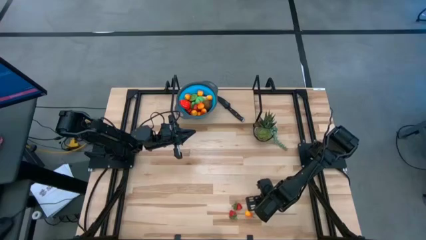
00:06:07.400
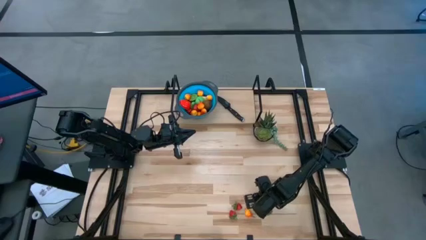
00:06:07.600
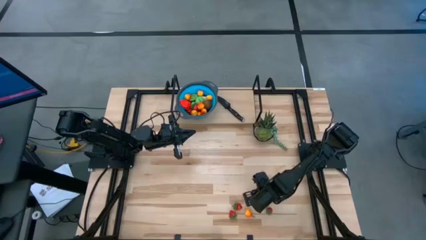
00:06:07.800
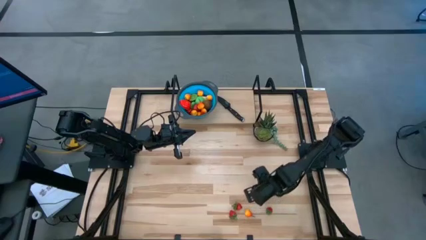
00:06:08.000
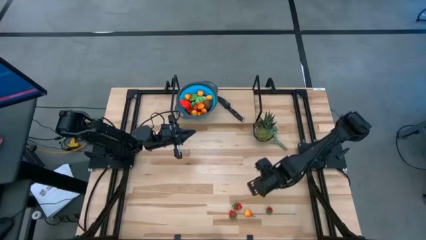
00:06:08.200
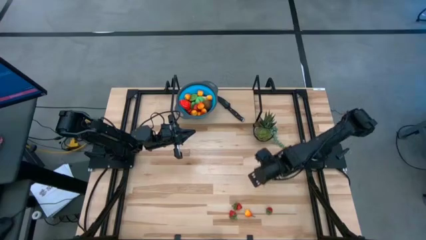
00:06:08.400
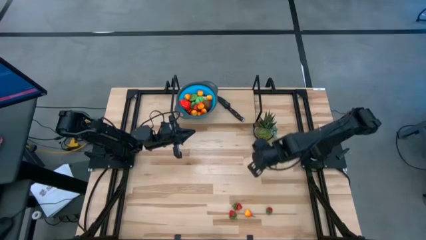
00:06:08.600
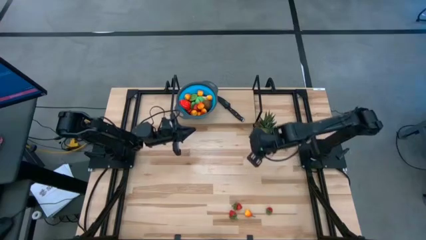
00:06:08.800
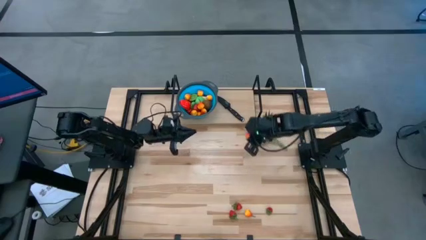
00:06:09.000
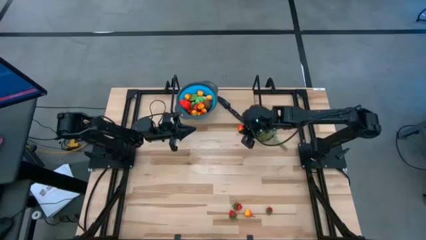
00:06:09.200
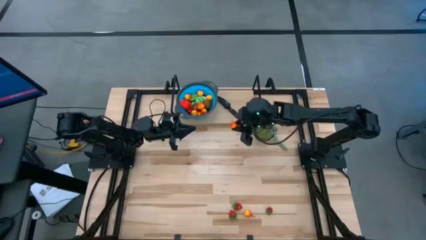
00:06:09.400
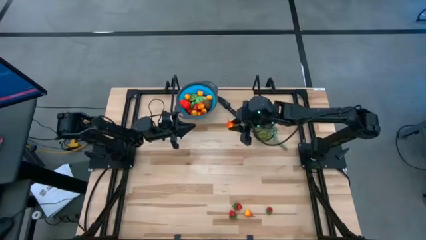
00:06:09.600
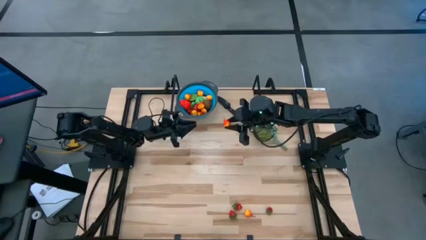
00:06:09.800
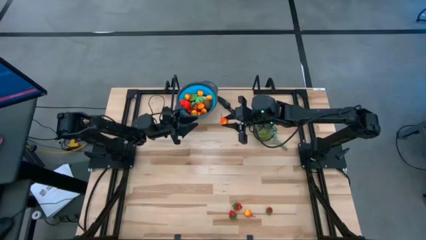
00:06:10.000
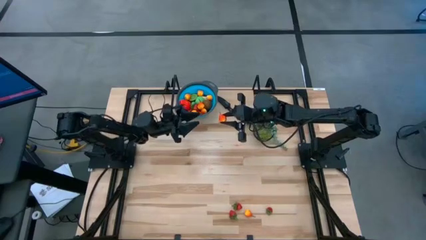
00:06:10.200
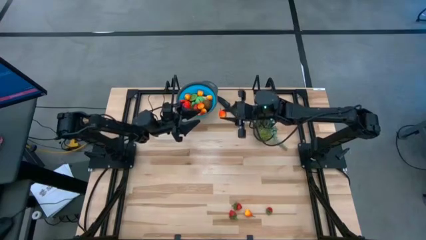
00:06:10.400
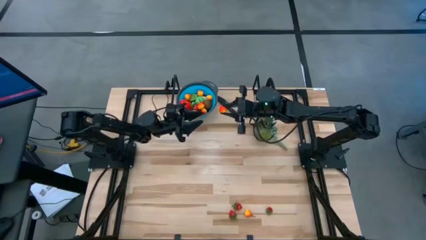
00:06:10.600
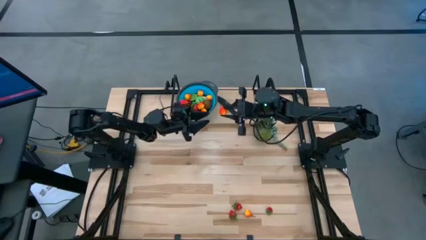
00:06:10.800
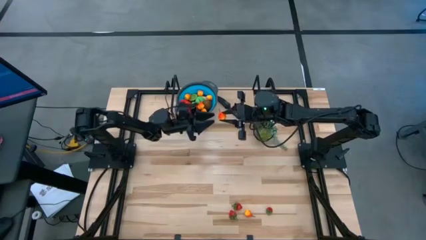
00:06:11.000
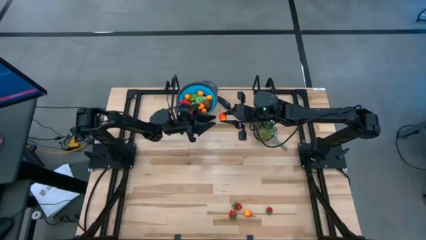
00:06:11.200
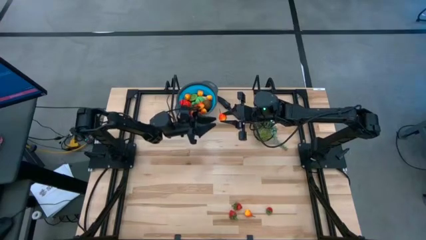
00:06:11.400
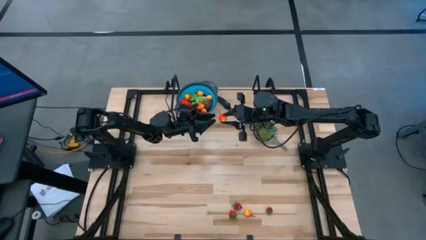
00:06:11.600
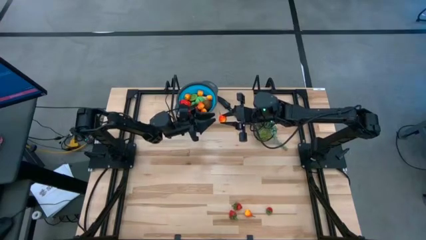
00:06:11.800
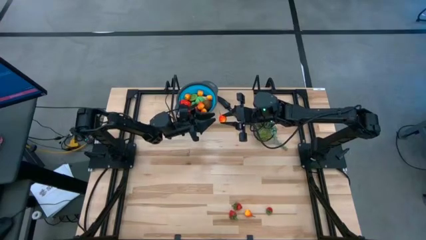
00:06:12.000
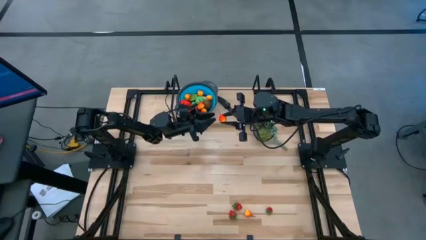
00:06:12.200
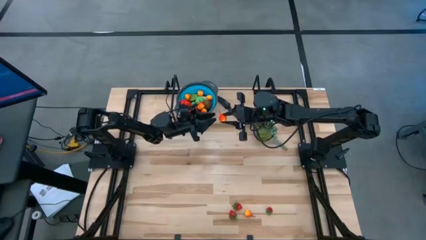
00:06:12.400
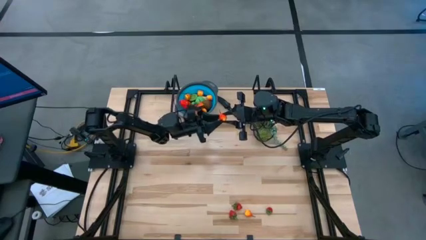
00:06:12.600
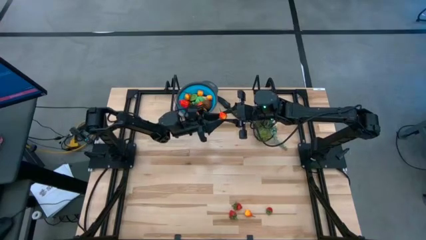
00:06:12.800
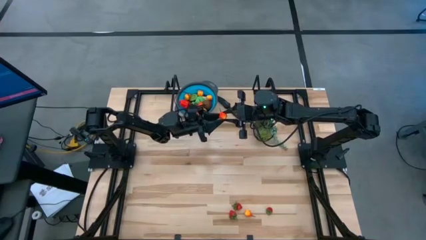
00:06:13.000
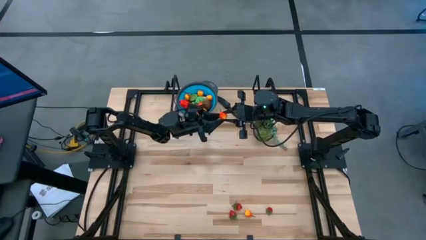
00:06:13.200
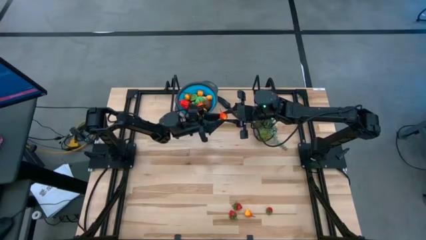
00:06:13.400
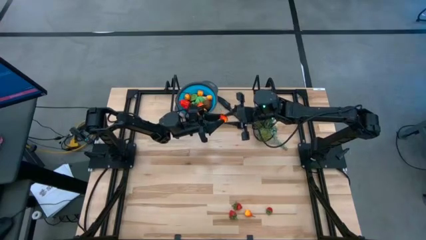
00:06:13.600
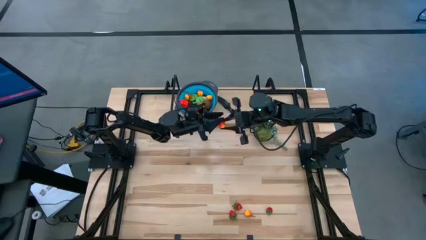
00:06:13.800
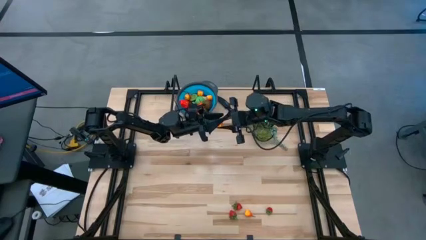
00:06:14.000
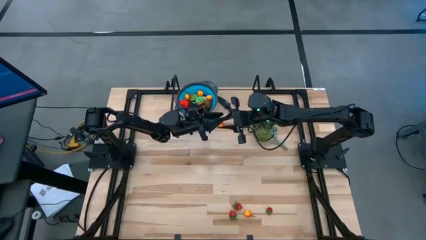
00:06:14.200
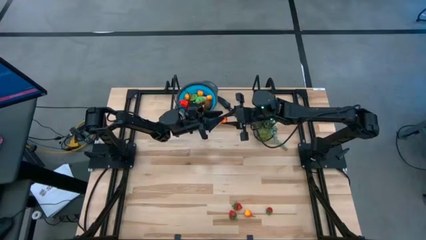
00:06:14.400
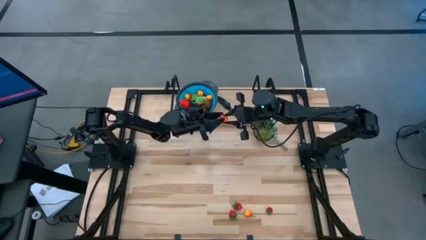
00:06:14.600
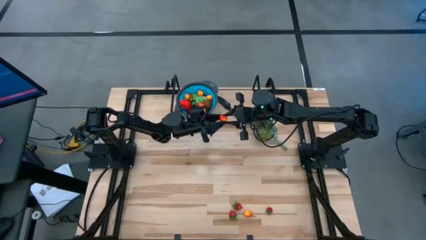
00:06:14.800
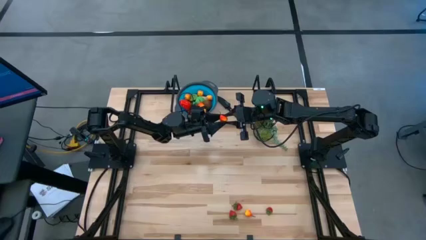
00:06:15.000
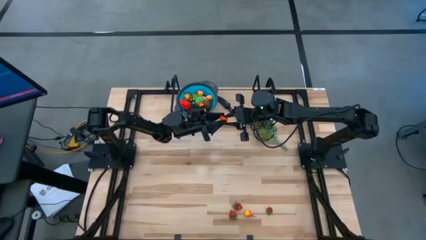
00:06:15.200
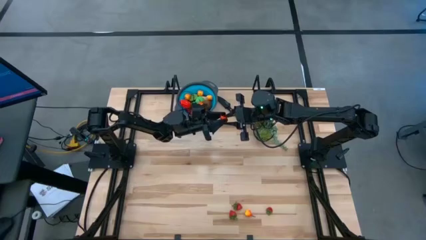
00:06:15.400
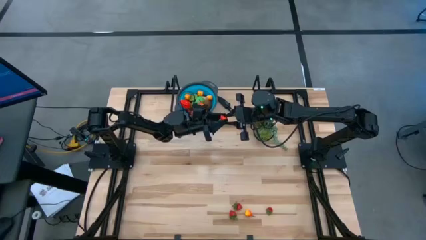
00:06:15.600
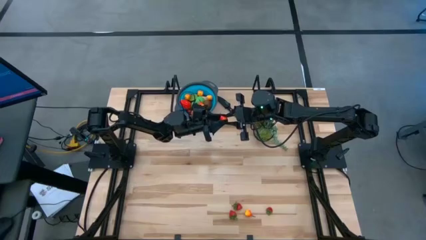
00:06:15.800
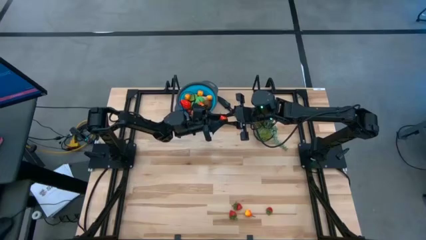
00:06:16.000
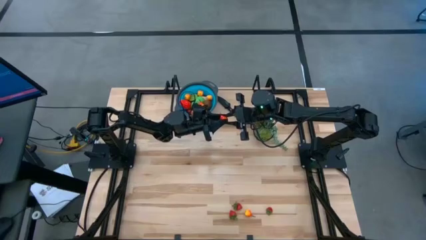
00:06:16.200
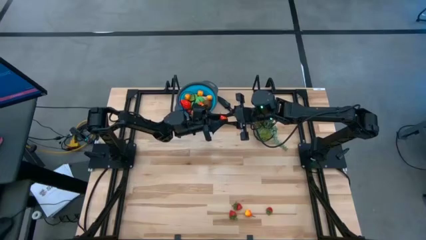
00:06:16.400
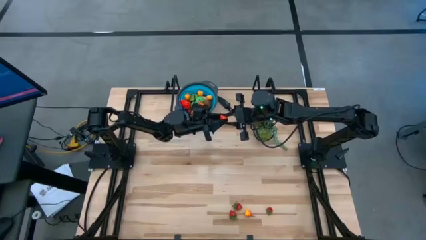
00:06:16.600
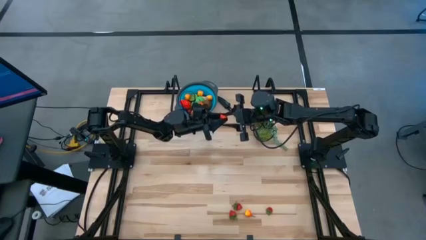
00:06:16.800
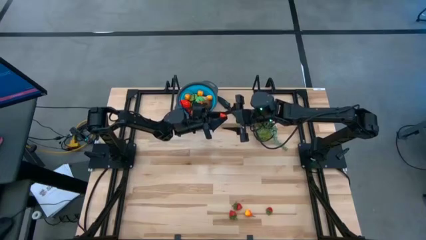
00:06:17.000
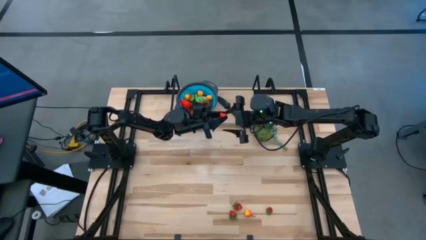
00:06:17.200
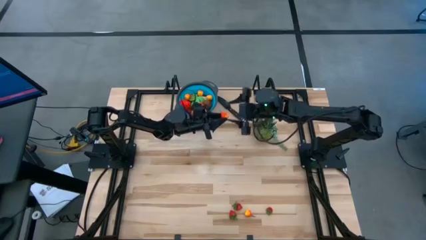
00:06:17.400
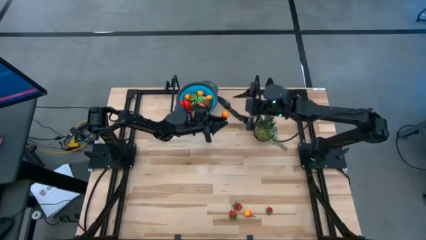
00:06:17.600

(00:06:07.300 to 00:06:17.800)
Task: Pick & Place Fruit
Put the pear into the basket

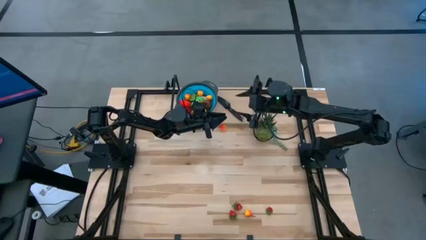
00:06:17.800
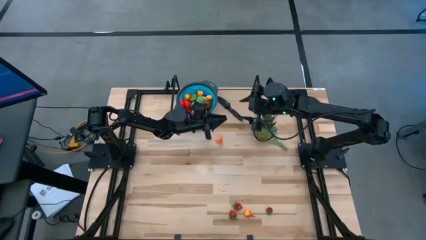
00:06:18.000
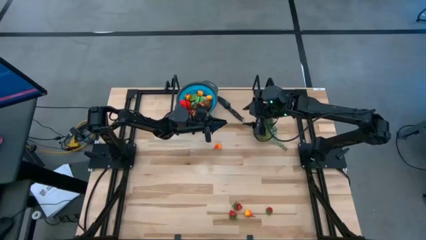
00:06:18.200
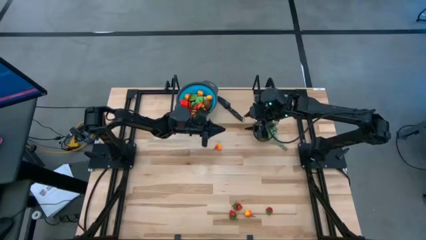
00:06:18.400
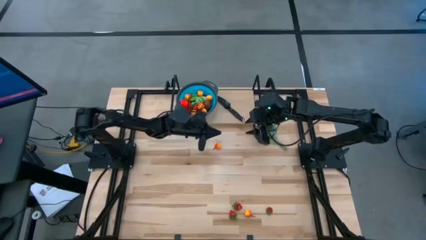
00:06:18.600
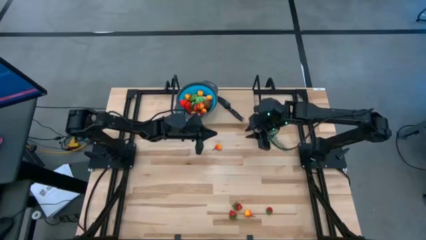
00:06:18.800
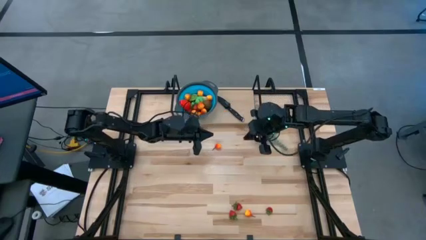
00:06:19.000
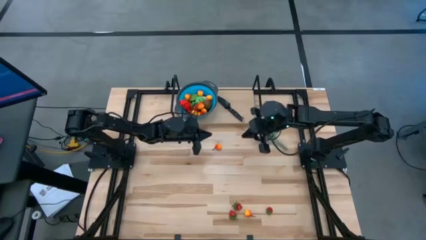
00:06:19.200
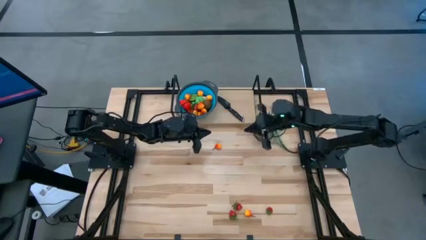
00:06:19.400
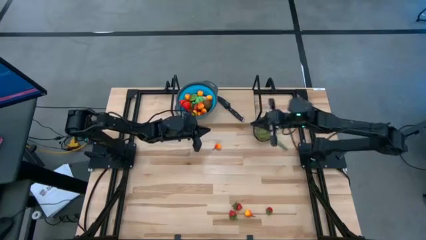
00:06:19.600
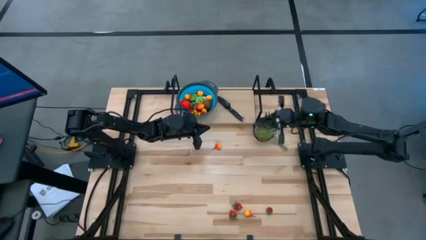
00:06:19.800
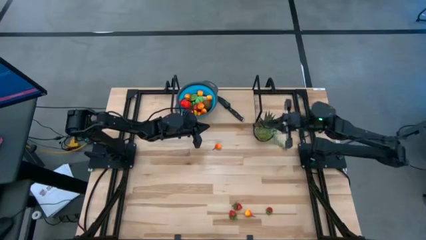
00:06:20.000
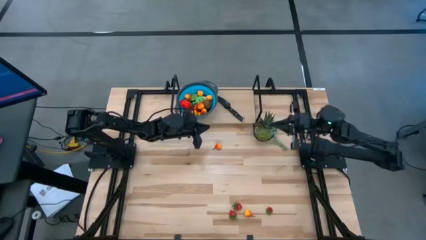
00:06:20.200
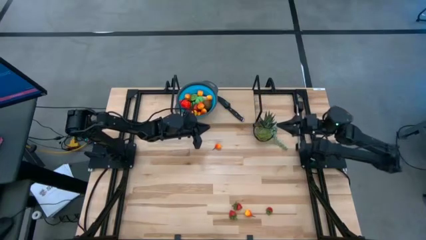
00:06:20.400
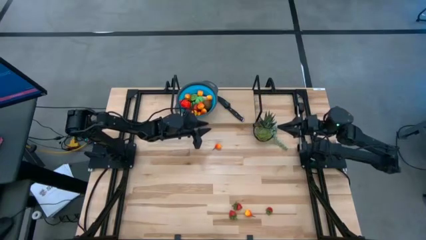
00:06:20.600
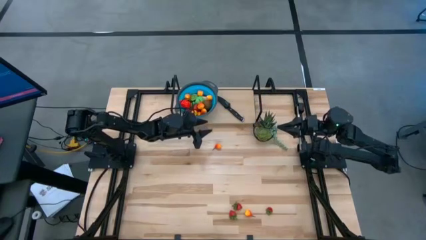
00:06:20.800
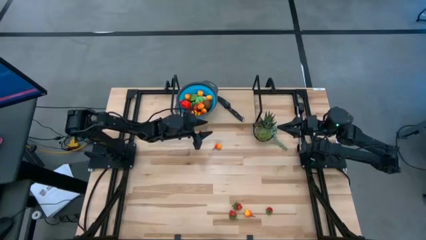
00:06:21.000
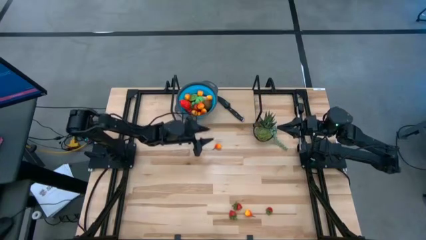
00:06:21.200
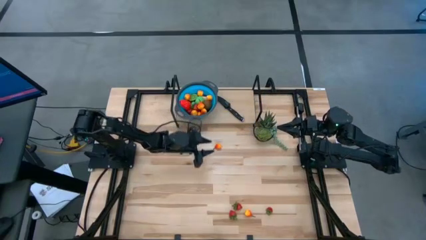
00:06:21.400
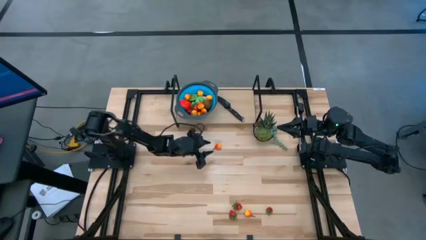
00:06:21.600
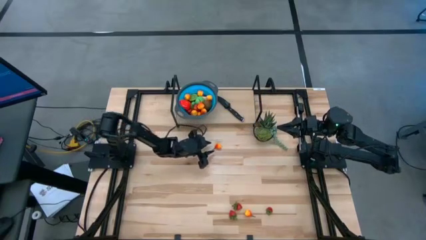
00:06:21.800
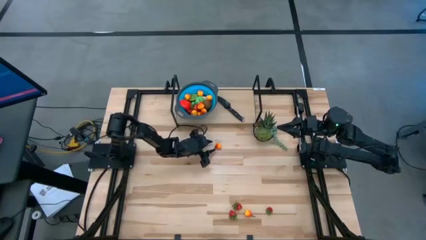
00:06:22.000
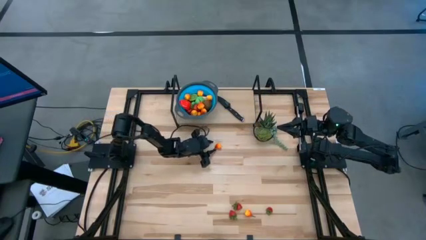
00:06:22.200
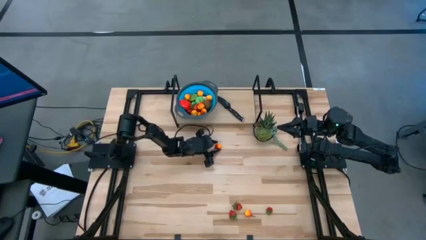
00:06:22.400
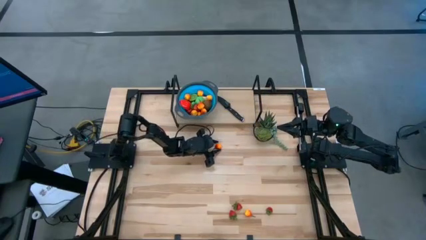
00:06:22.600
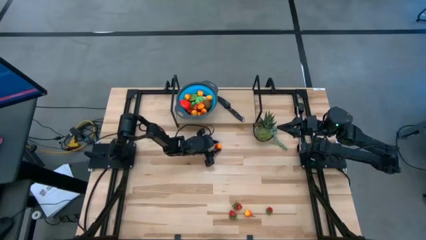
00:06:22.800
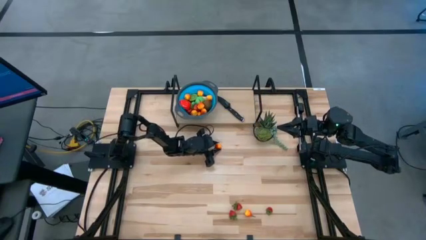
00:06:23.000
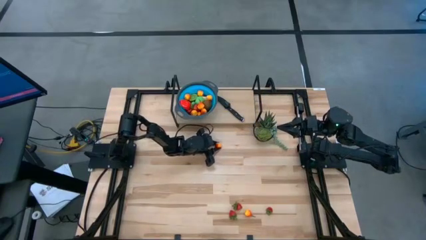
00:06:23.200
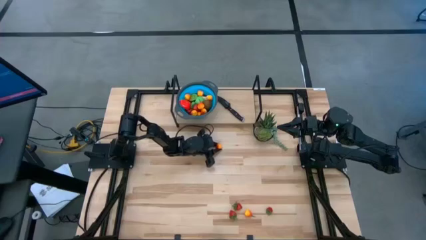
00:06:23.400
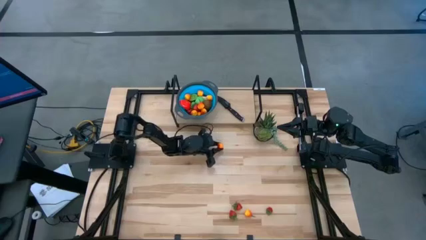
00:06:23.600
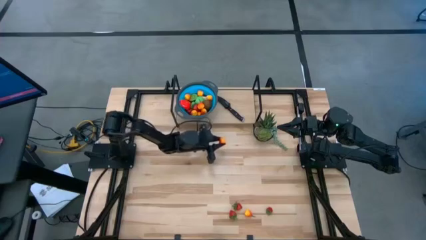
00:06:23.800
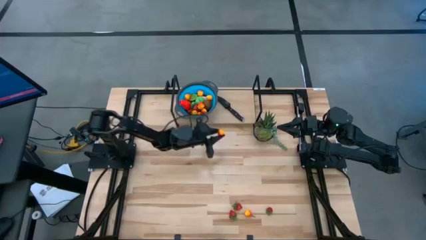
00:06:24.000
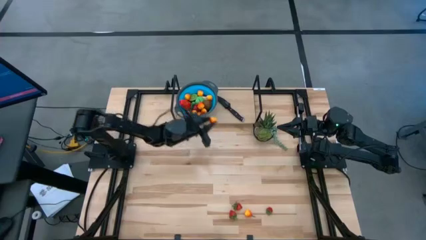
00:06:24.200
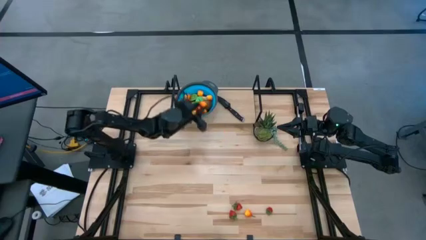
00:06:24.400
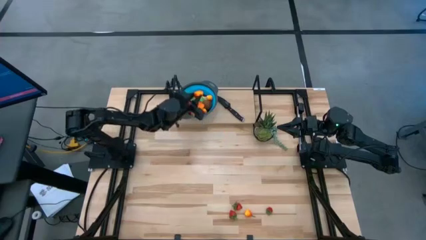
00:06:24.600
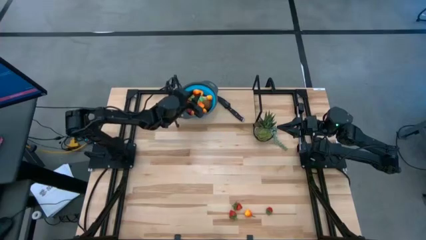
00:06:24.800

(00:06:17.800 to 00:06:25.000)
Put the pear into the basket
